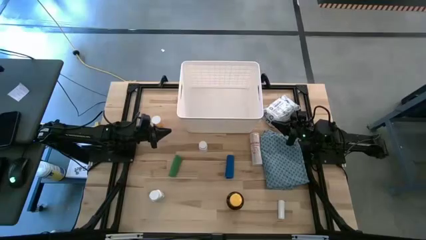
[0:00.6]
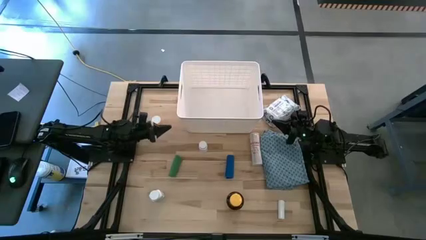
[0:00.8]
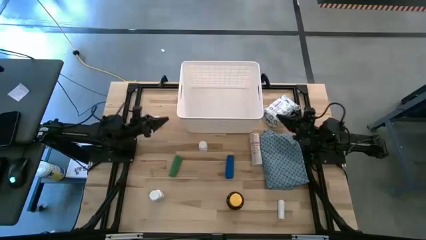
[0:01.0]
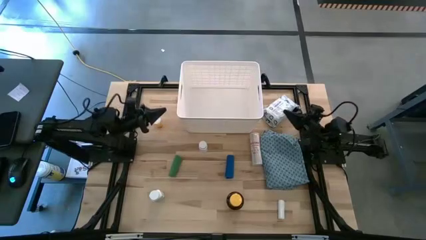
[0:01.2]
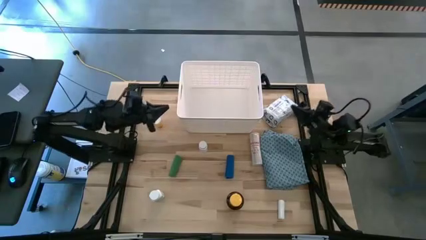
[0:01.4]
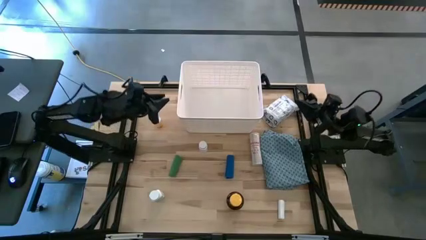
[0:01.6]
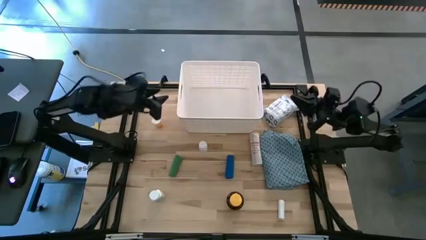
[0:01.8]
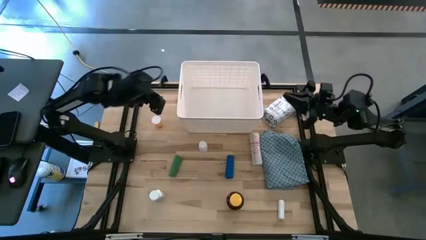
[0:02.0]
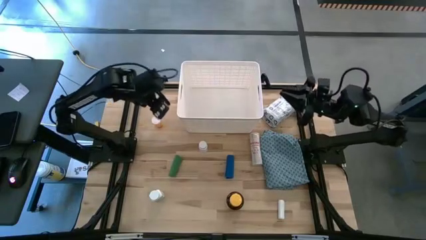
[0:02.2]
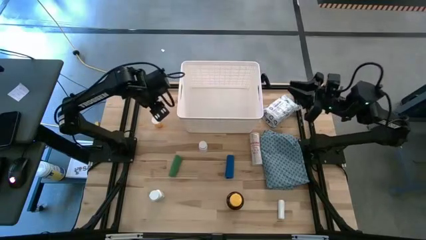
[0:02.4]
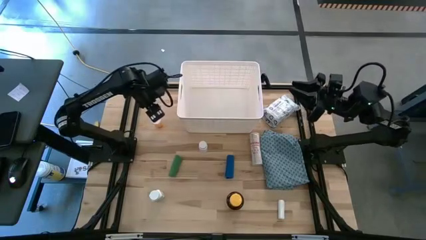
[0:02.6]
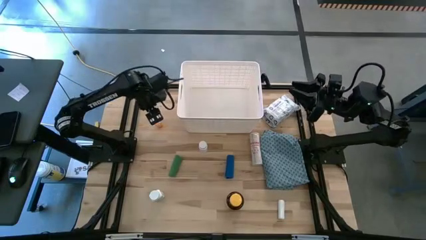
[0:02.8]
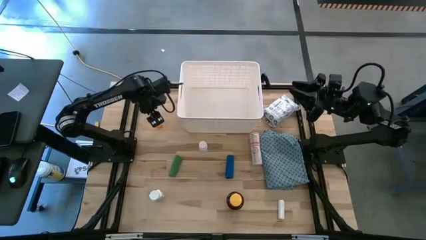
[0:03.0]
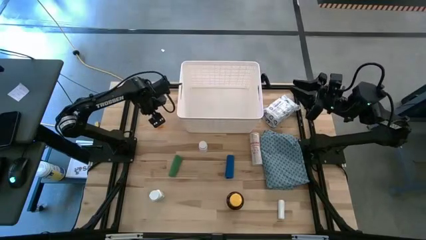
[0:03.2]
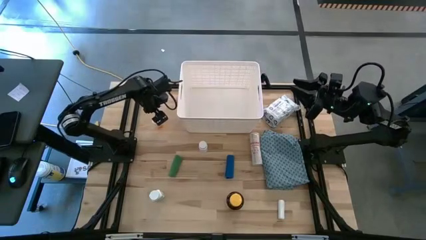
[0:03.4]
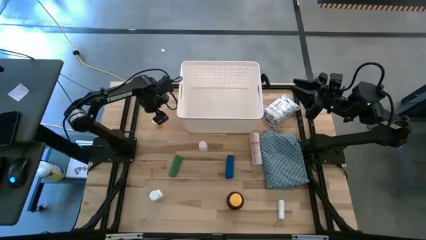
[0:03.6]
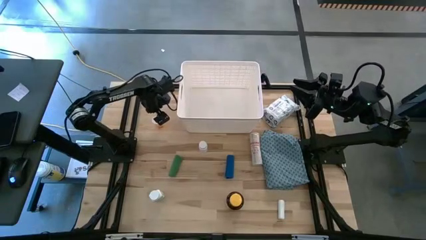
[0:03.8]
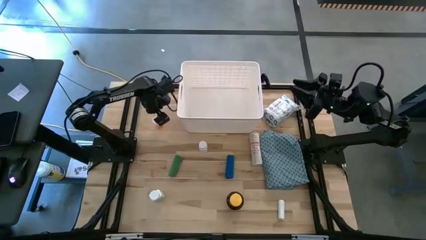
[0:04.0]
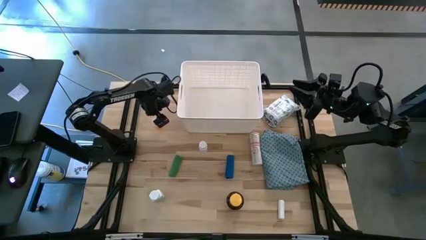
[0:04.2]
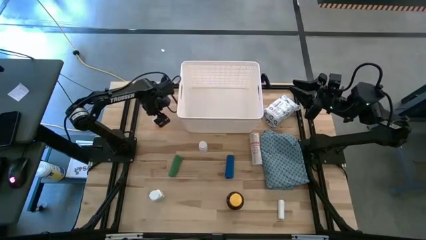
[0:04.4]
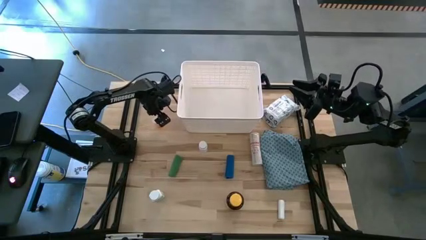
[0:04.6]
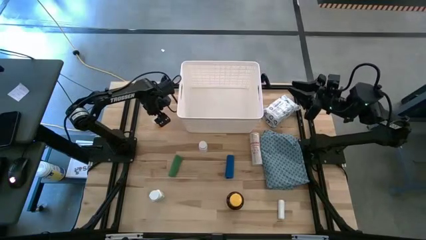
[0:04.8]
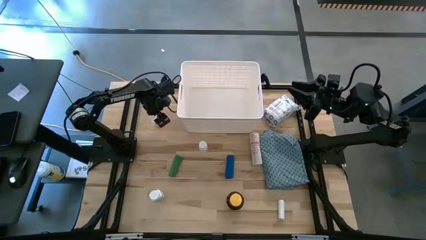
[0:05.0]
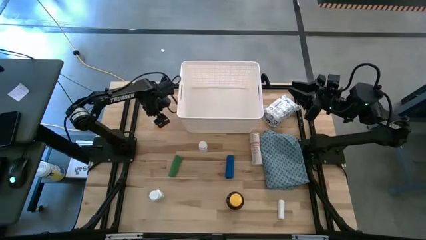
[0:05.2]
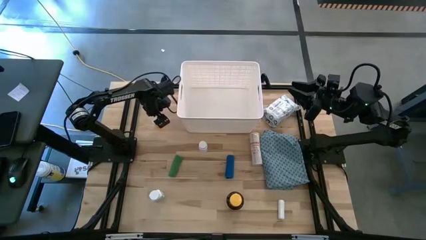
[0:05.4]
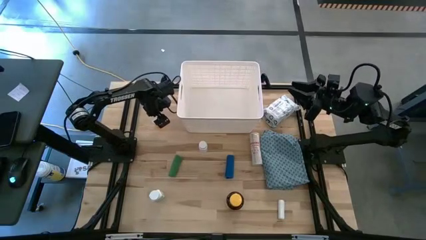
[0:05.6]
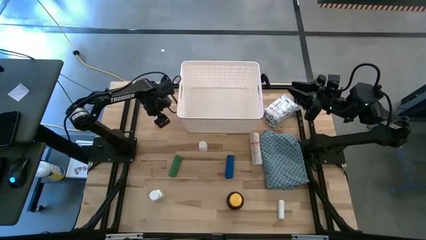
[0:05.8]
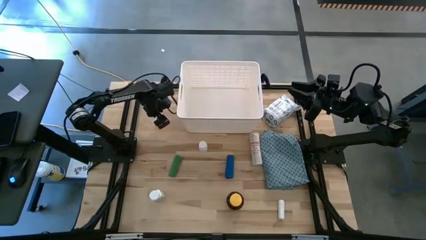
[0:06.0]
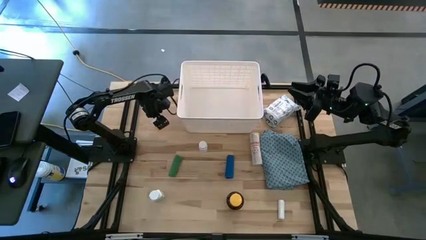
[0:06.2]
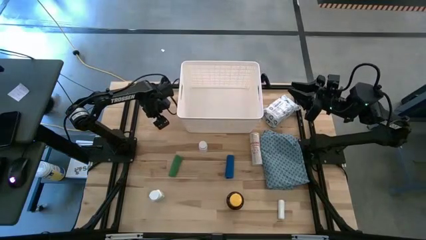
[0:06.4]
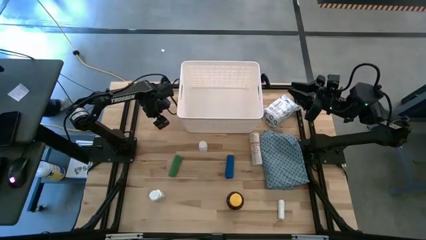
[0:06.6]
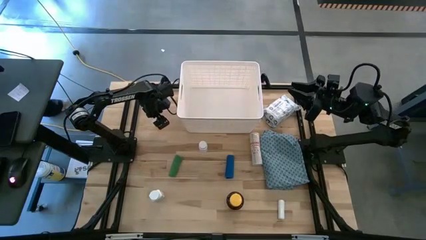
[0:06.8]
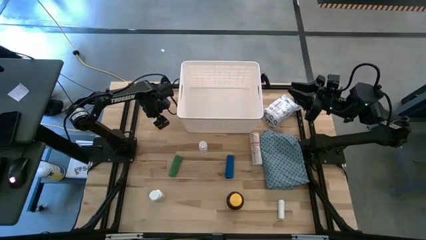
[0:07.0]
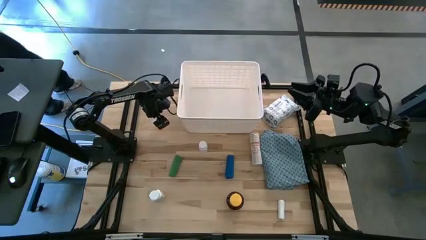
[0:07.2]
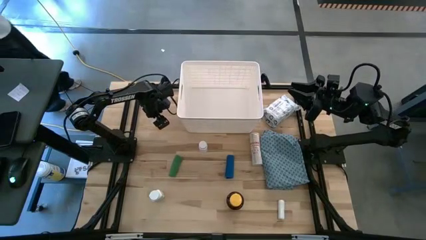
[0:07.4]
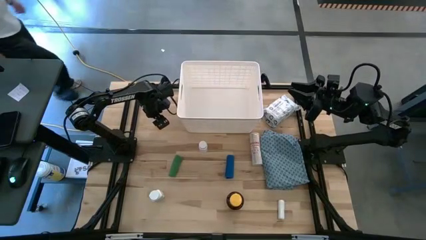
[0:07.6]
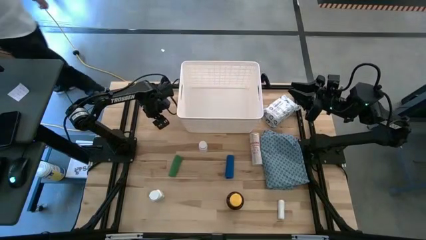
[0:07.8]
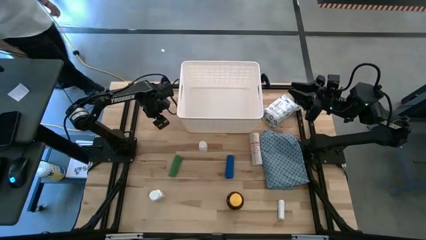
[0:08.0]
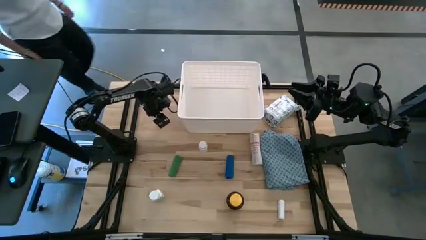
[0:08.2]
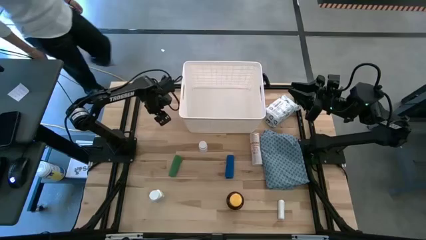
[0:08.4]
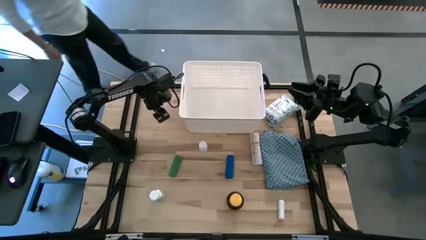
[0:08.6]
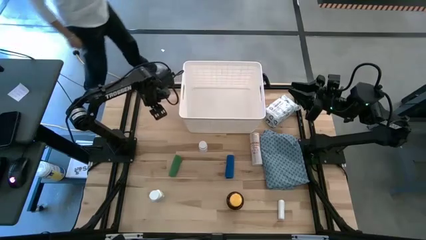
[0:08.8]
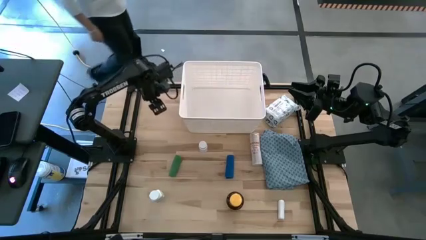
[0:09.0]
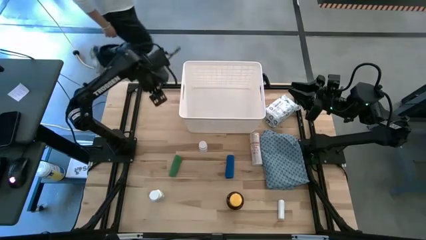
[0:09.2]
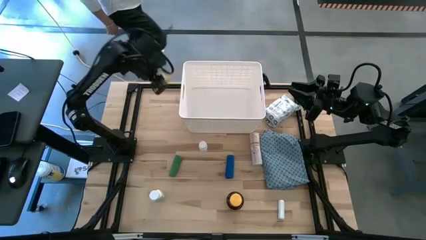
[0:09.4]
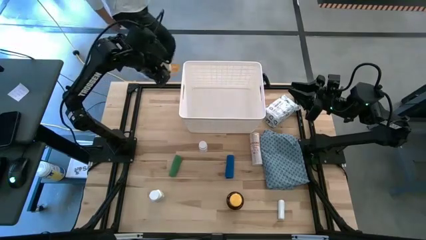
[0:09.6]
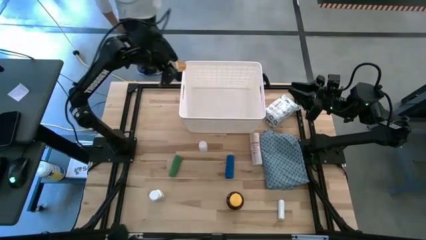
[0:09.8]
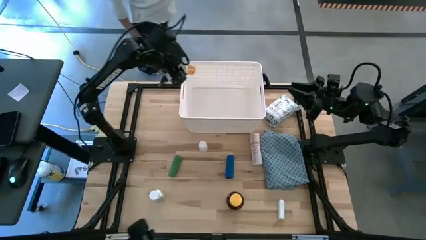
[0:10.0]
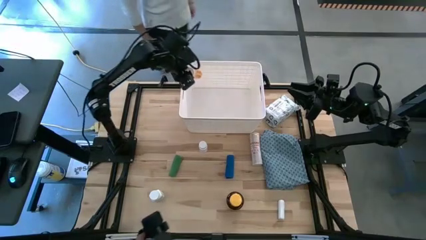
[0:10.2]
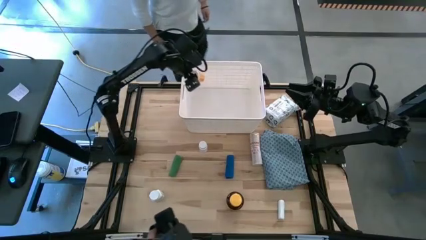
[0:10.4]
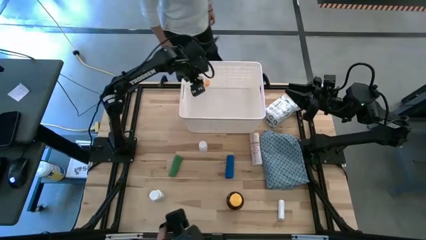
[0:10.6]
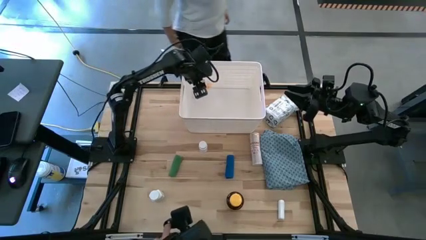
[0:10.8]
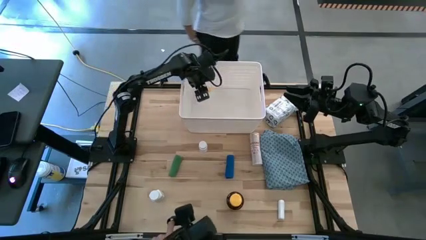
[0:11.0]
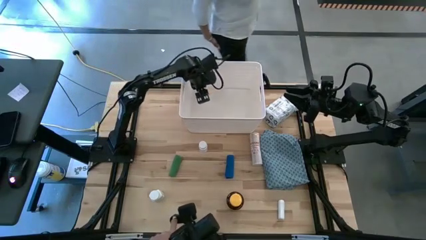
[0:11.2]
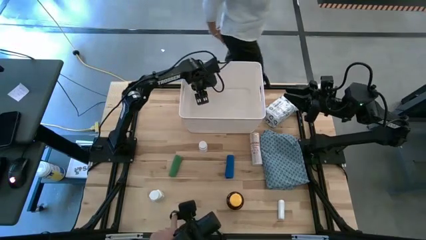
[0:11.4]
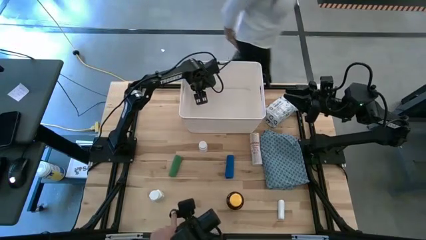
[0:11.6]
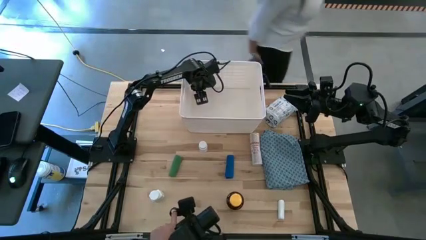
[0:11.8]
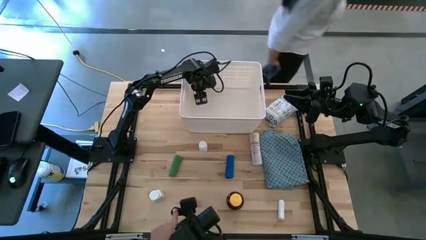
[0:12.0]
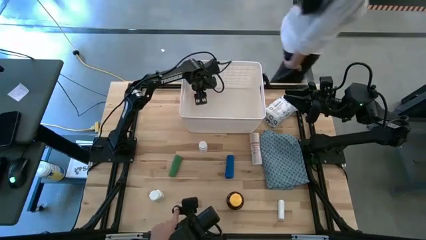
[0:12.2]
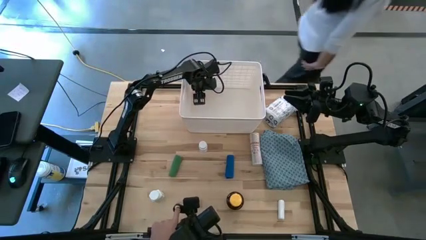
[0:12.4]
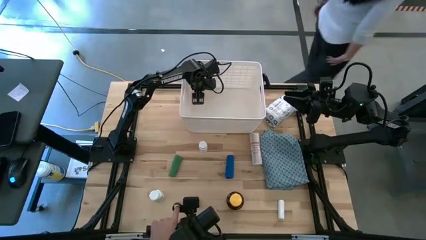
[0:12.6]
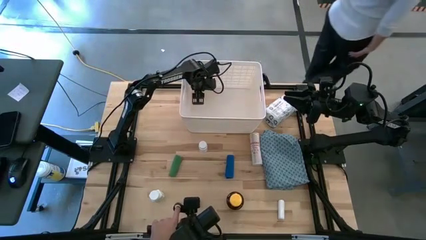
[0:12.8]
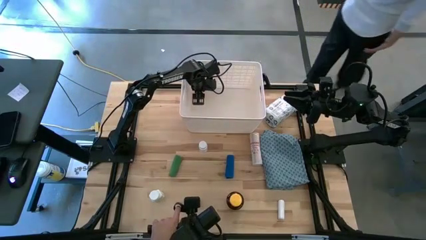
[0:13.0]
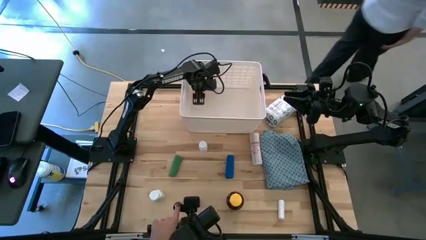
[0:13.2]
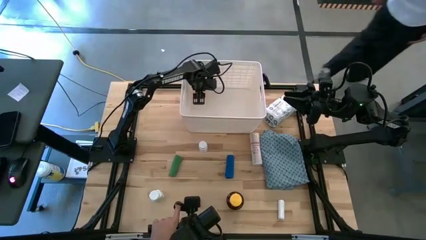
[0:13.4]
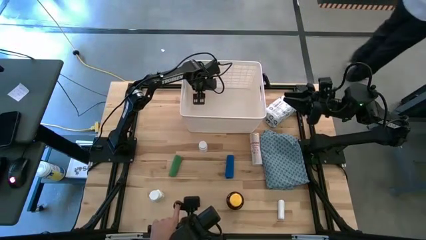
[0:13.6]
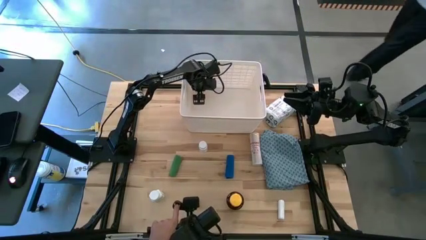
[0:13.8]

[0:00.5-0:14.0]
Task: Pick & place medical supplies in basket/bin
Put the orange medicine bottle into the white bin
